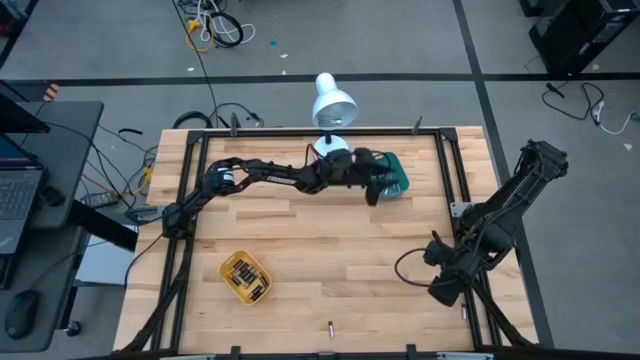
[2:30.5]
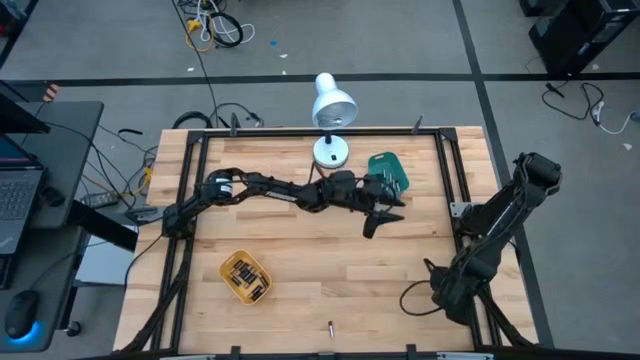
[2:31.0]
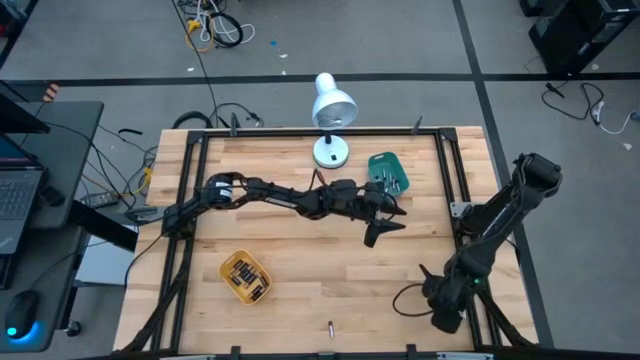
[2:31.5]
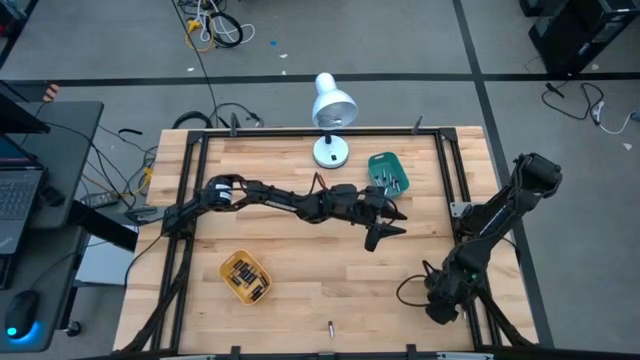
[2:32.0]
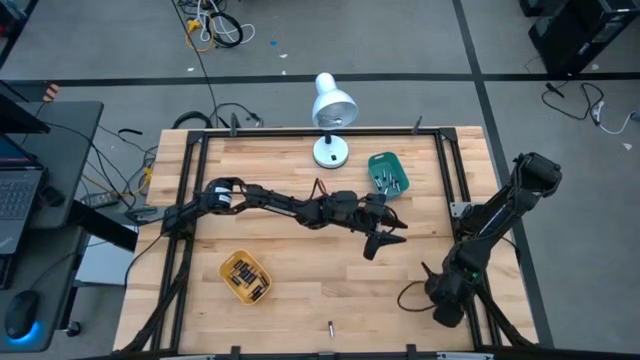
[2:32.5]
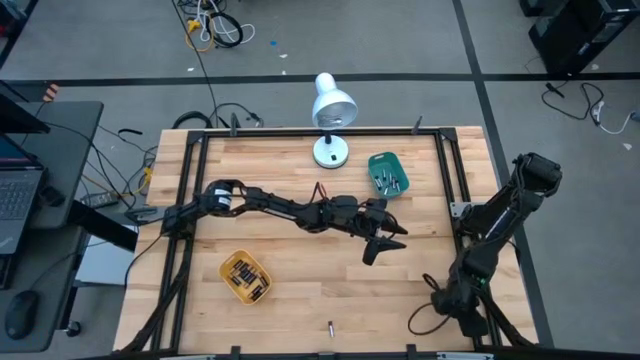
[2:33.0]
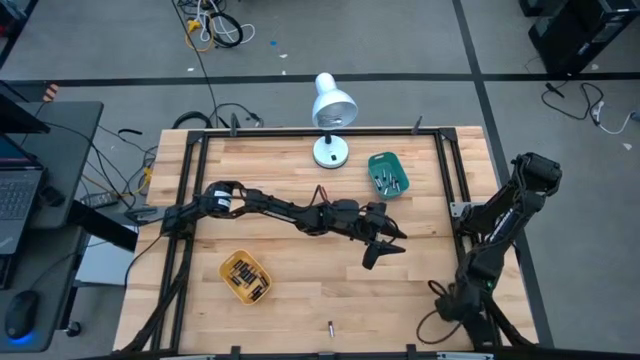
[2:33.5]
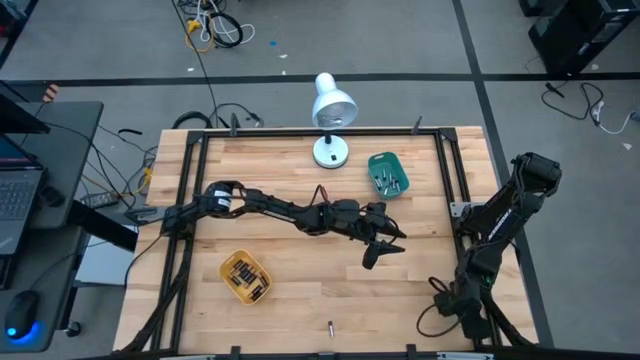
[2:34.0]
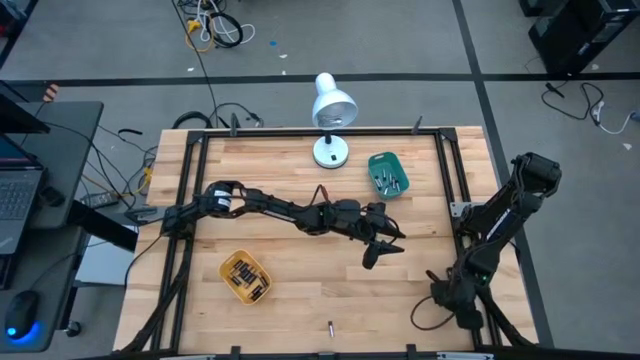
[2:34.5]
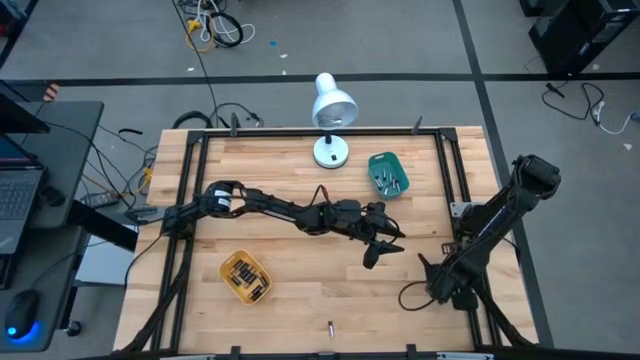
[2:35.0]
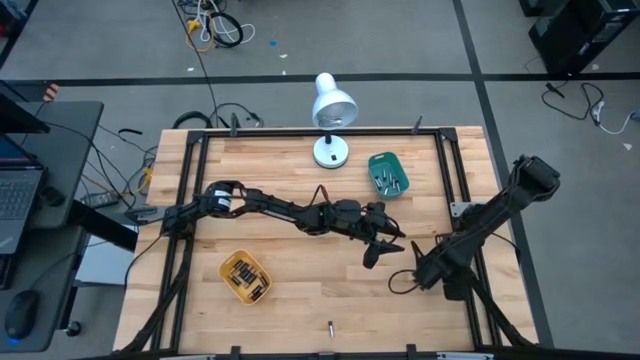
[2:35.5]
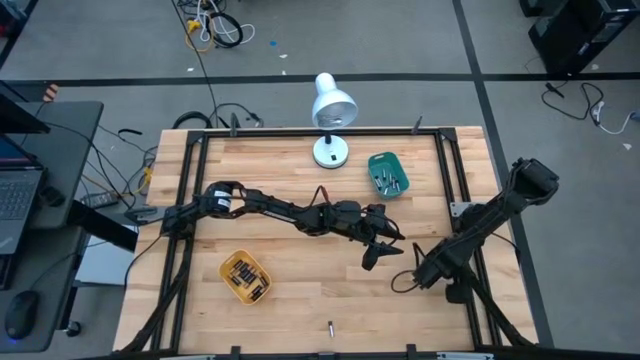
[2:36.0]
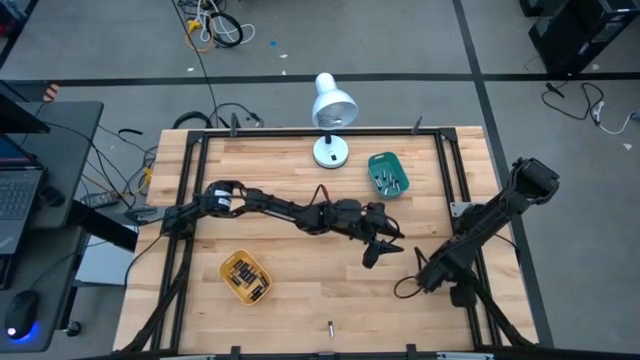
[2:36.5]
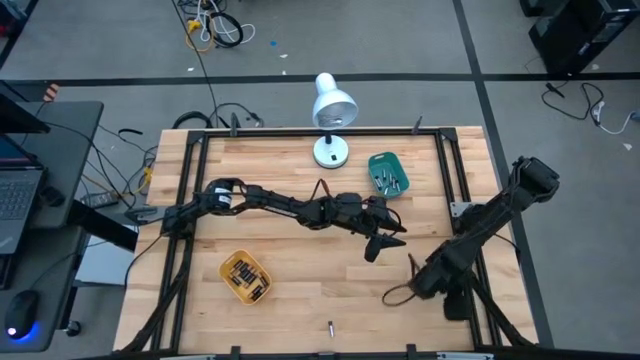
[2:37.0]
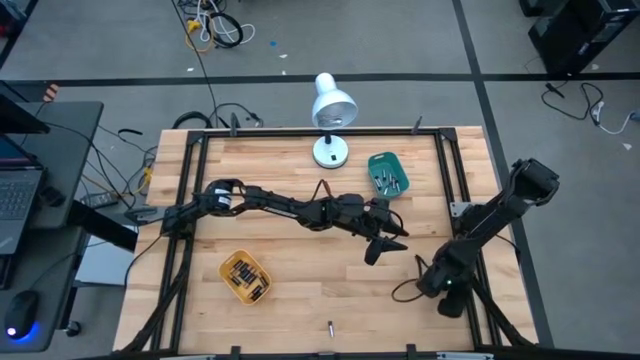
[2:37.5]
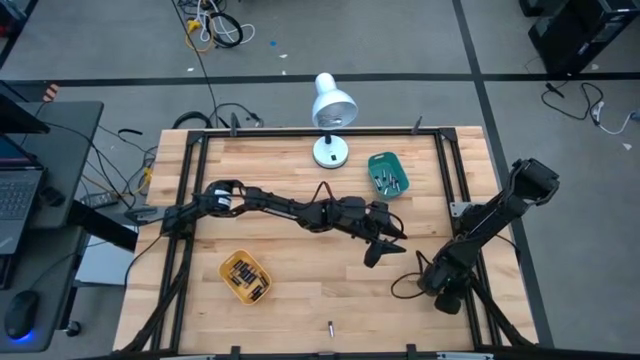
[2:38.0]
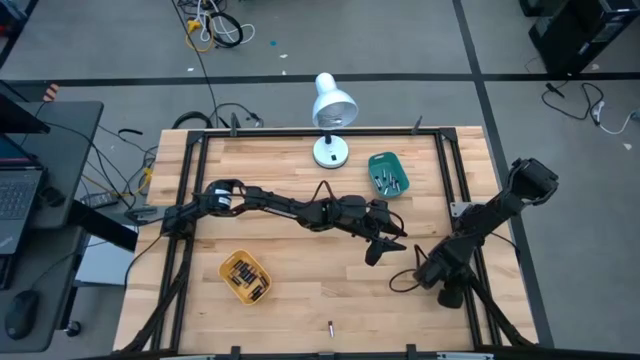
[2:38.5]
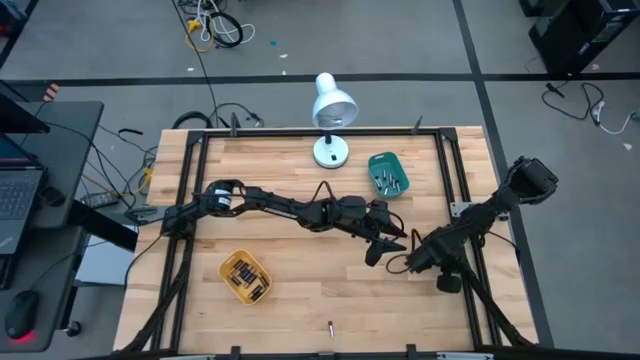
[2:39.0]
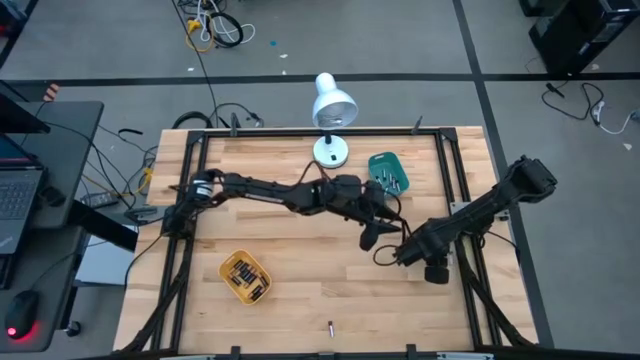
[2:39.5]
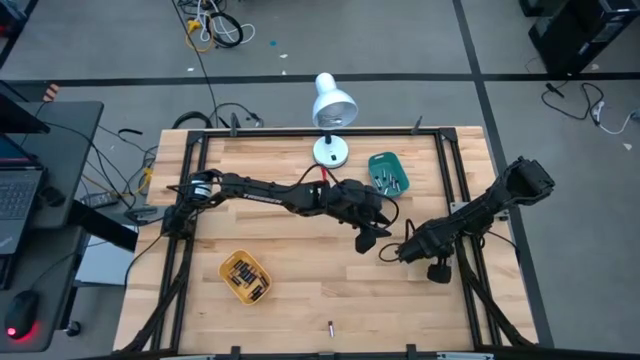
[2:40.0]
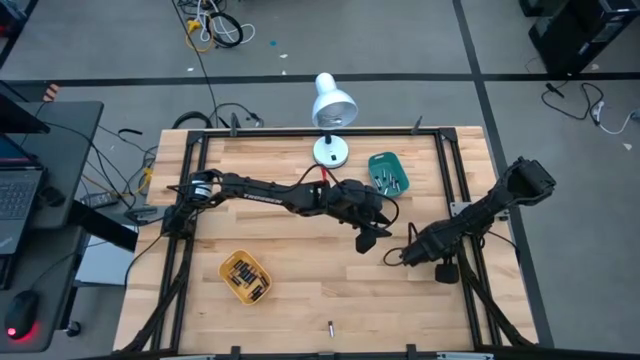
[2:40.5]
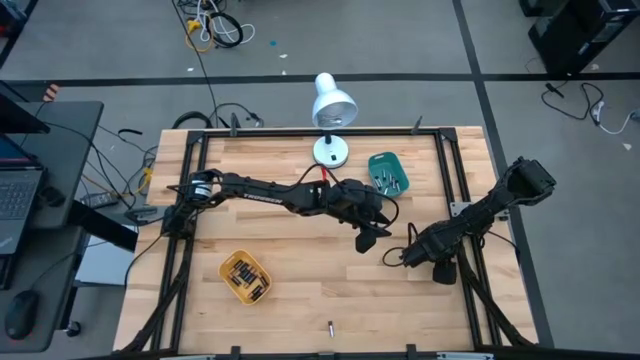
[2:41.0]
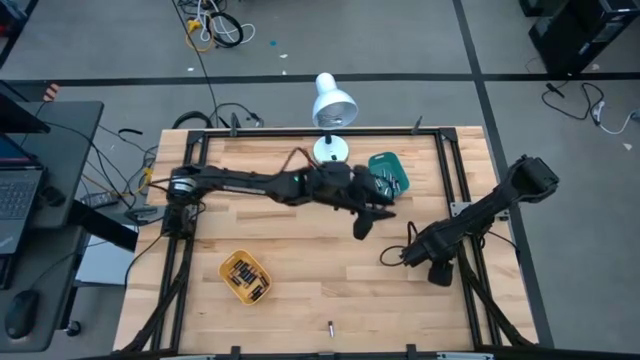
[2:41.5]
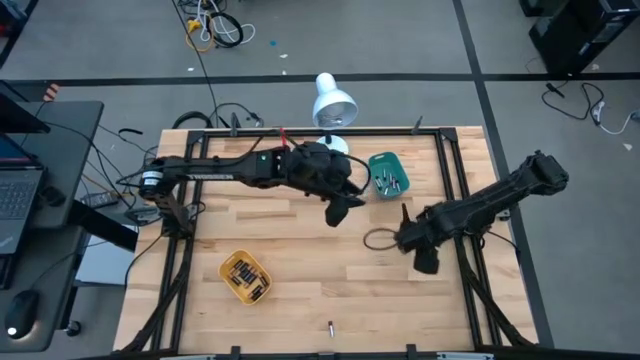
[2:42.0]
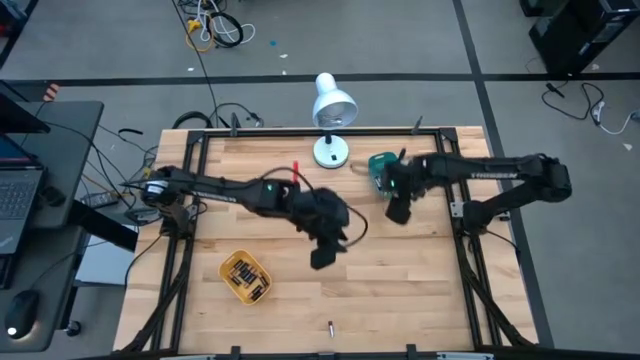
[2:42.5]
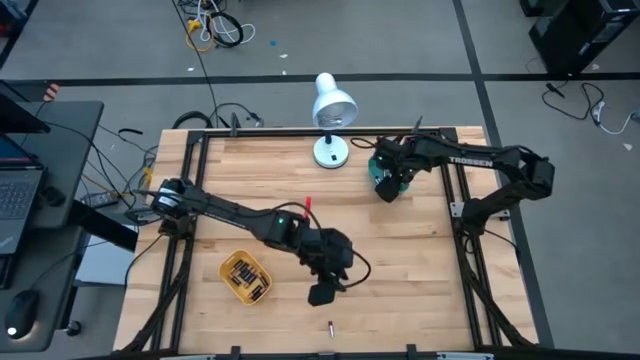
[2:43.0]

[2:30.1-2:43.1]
Task: Sort batteries
Put the right silver battery into the green bin

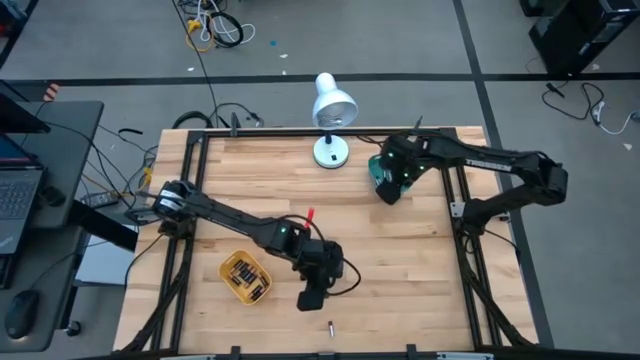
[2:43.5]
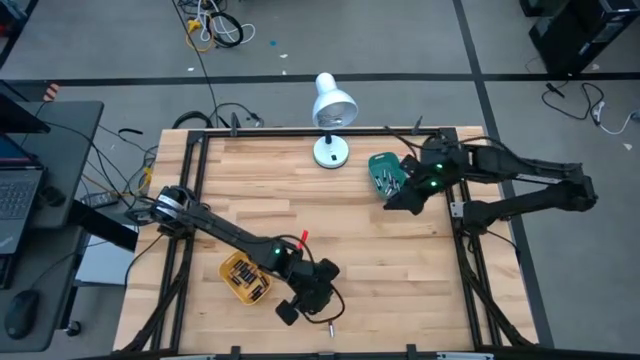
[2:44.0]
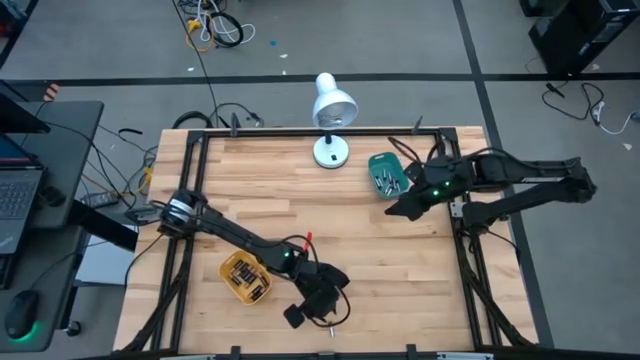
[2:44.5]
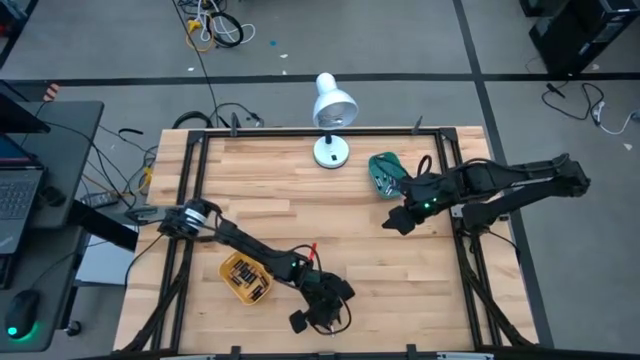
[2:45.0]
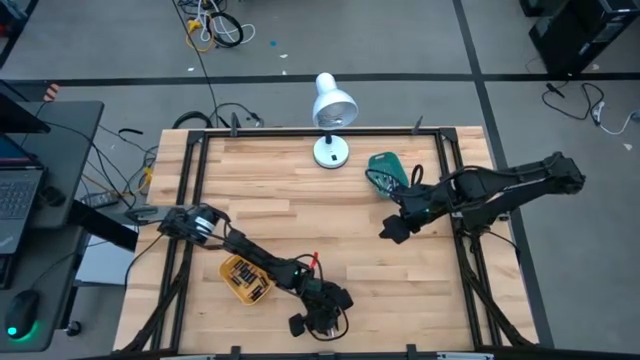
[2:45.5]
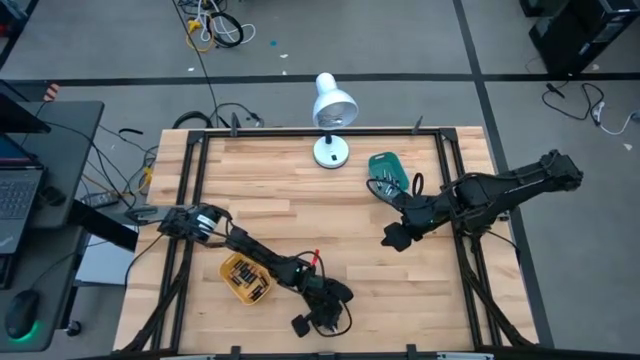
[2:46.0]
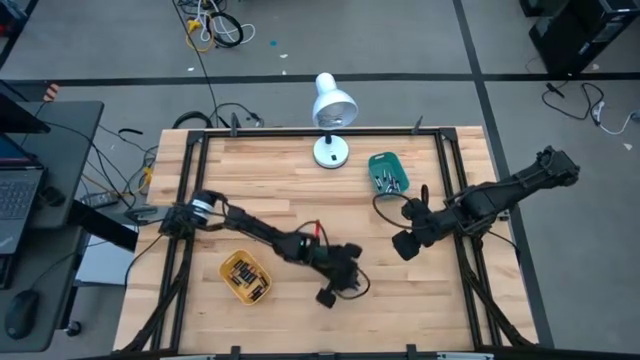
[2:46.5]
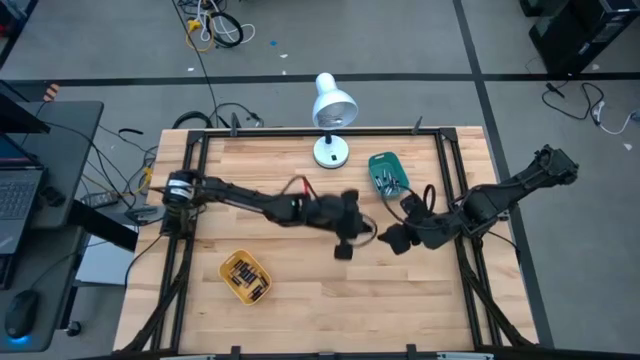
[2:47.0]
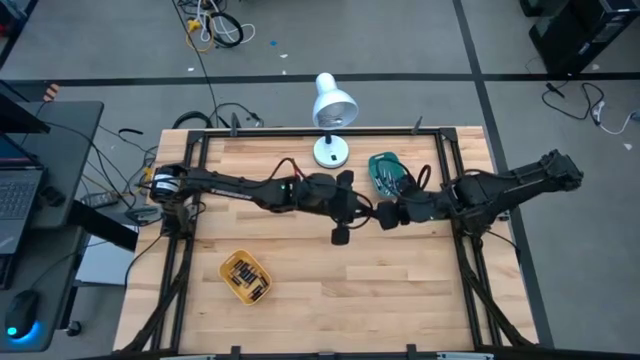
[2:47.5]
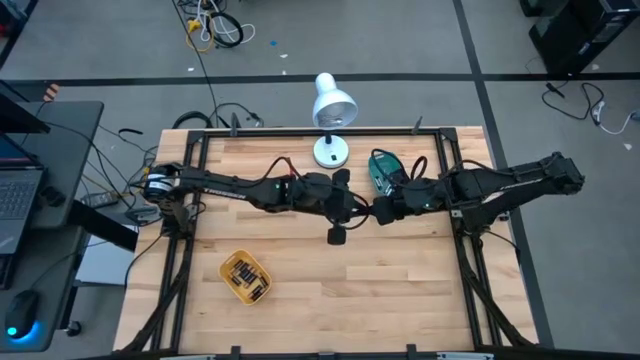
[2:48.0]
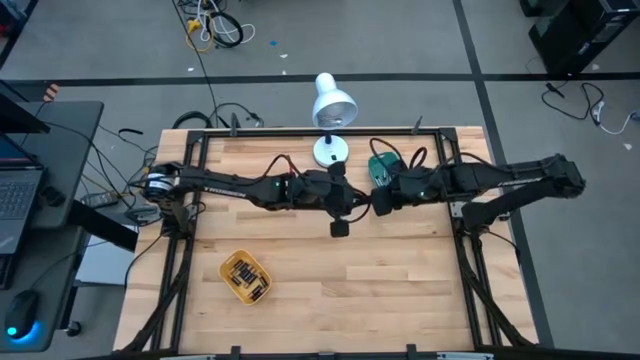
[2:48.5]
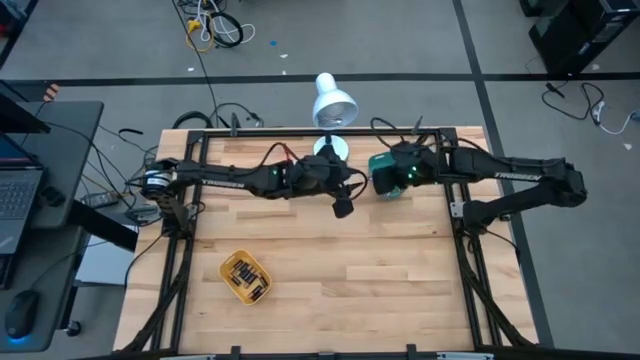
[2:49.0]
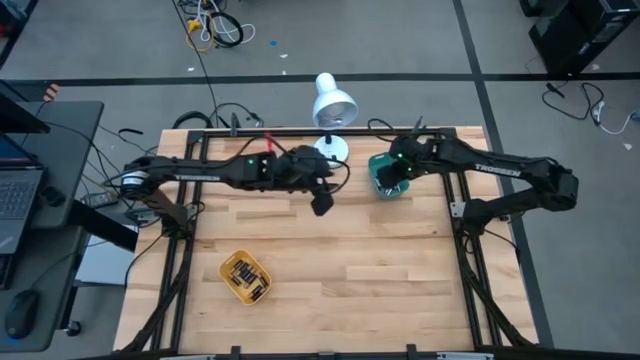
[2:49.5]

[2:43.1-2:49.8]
Put the silver battery into the green bin

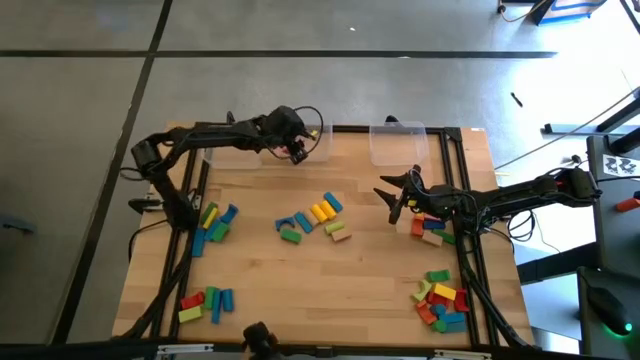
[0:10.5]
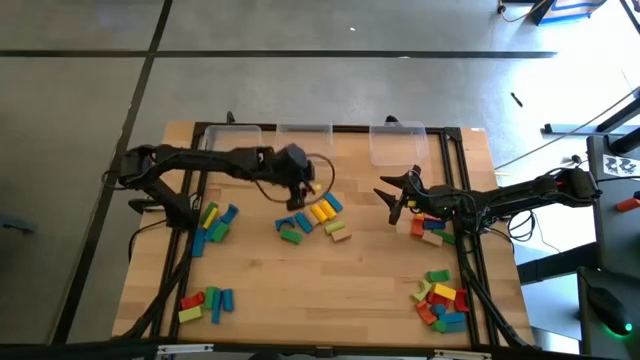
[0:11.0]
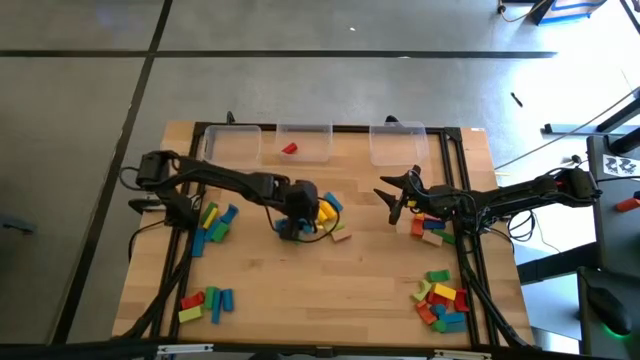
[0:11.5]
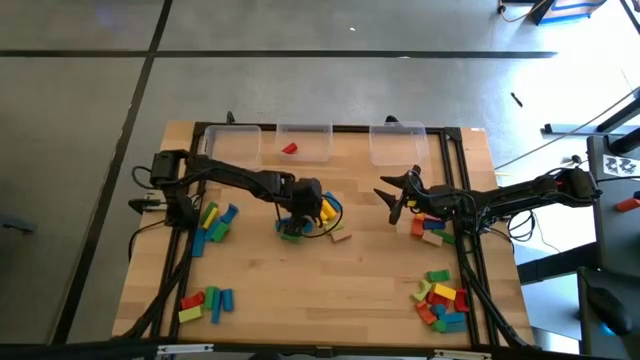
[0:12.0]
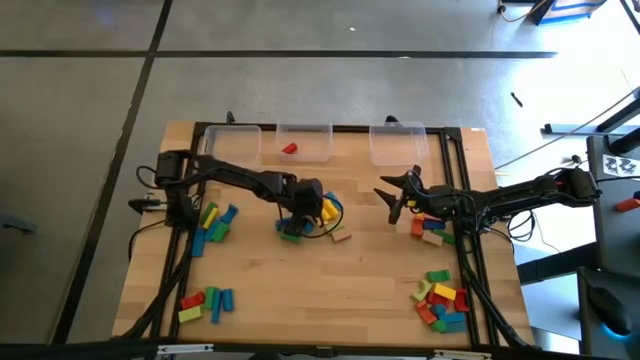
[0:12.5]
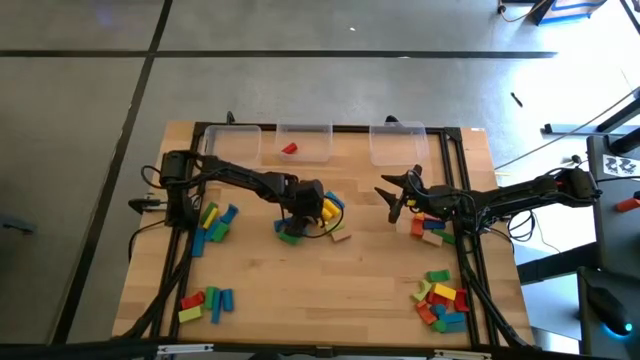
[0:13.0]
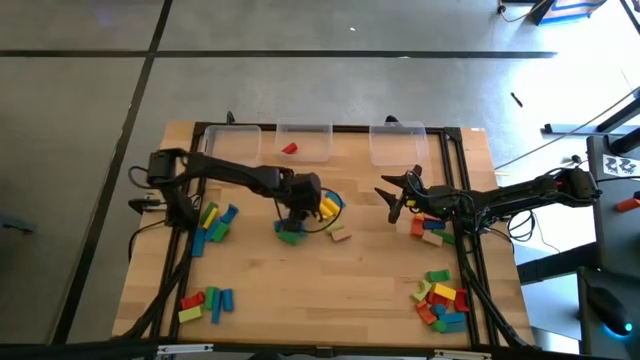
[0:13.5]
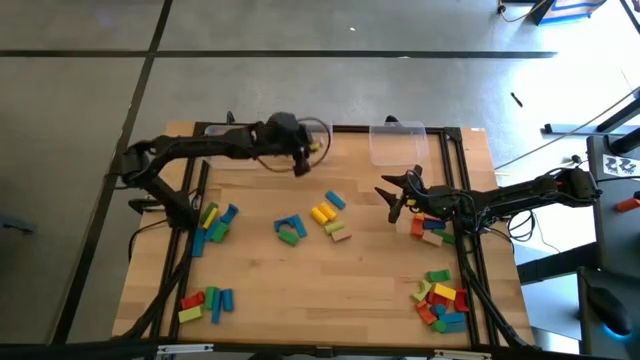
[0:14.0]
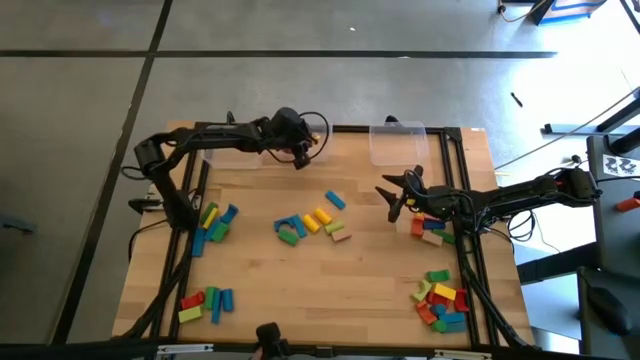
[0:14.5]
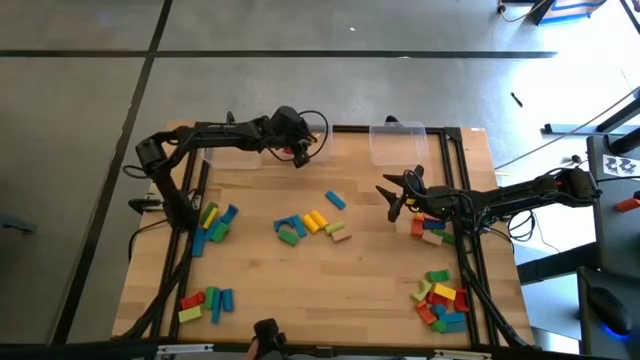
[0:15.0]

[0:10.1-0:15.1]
Task: Sort blocks by size
Put the brown cylindrical block into the middle transparent bin
